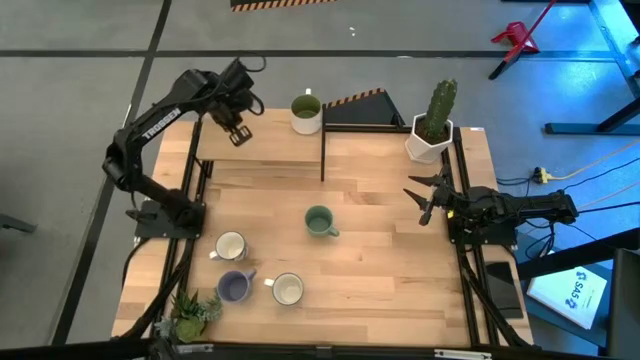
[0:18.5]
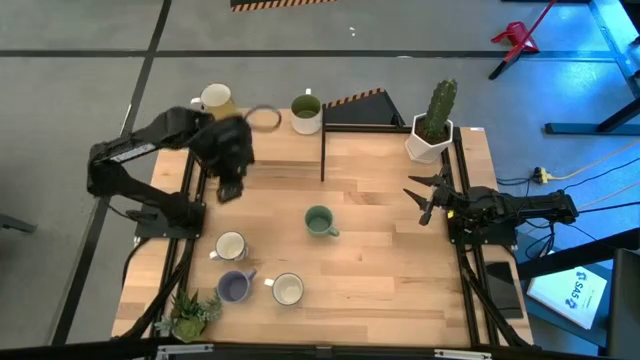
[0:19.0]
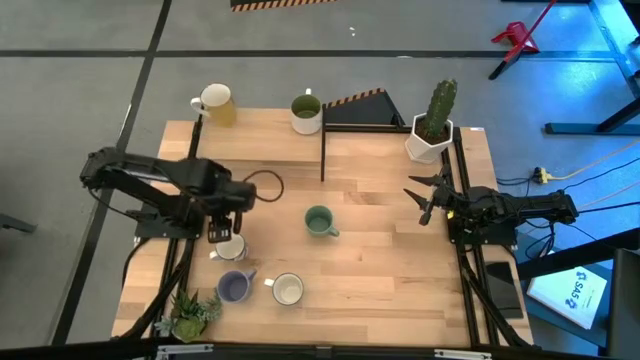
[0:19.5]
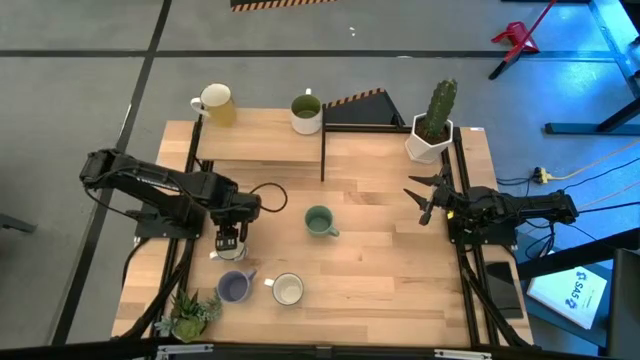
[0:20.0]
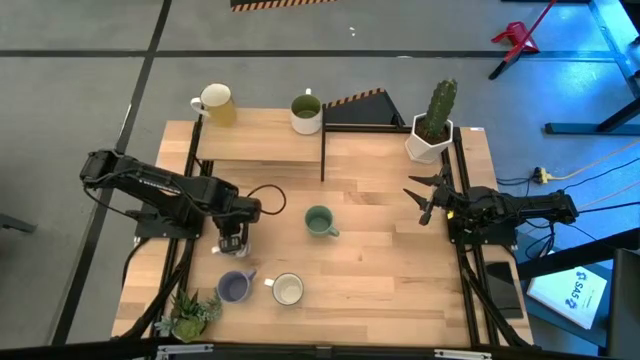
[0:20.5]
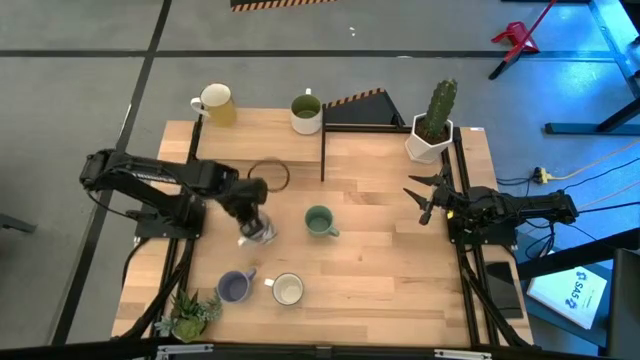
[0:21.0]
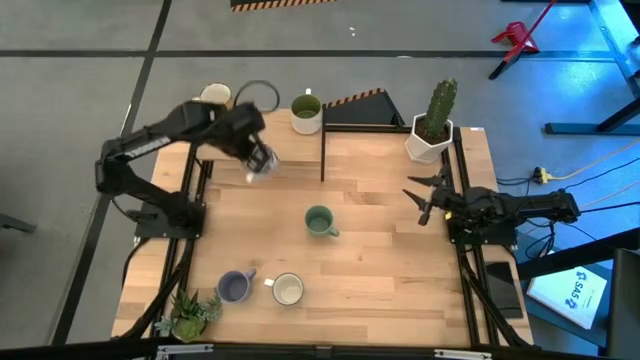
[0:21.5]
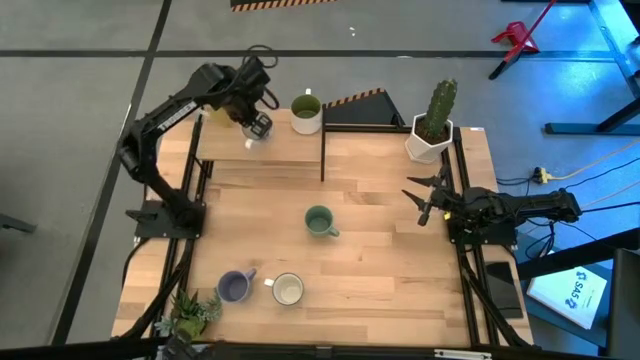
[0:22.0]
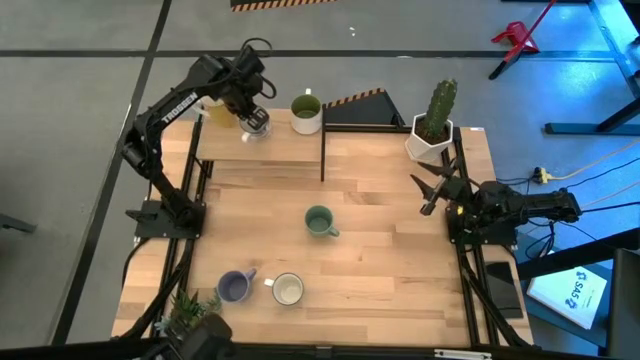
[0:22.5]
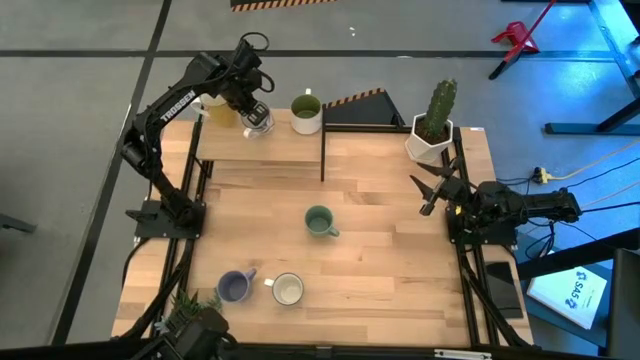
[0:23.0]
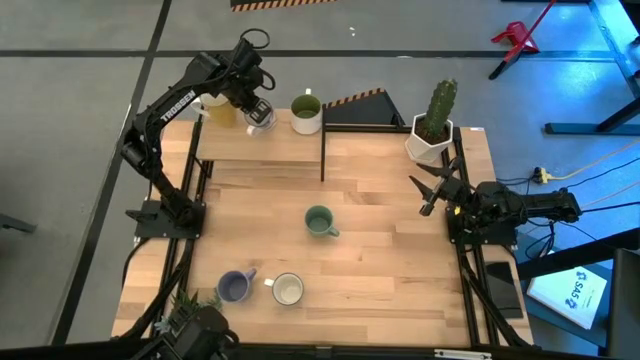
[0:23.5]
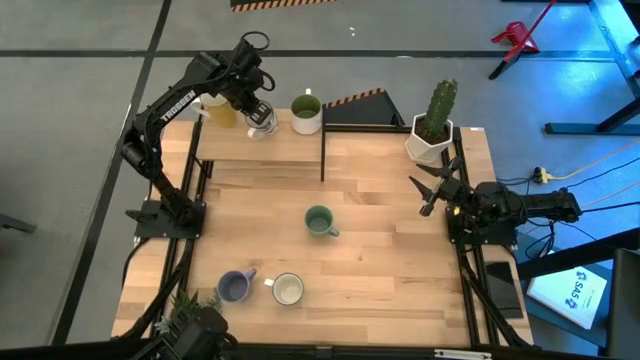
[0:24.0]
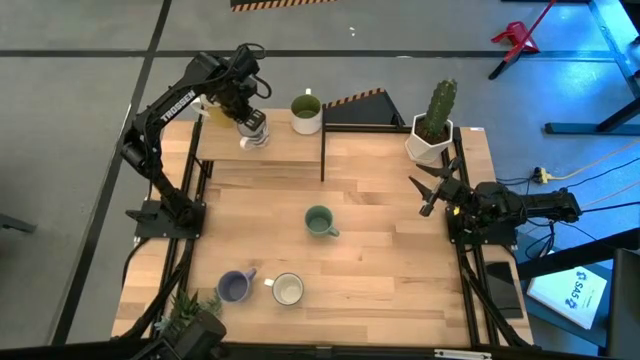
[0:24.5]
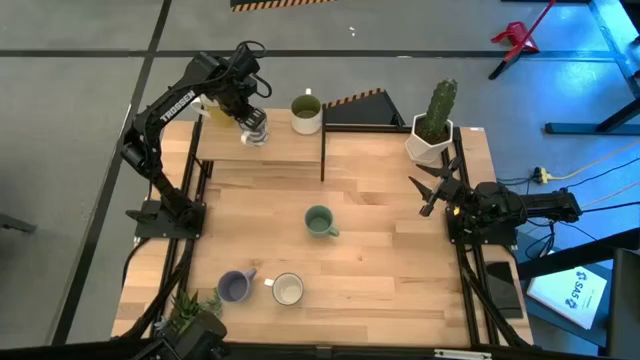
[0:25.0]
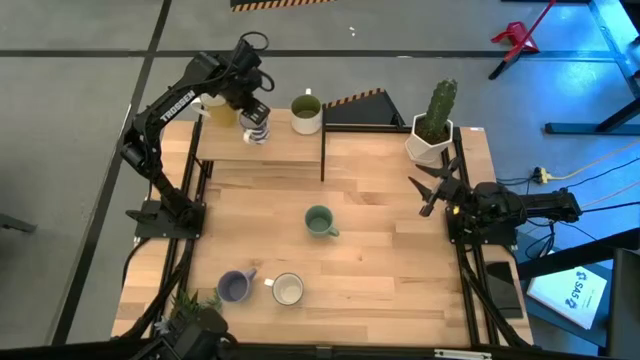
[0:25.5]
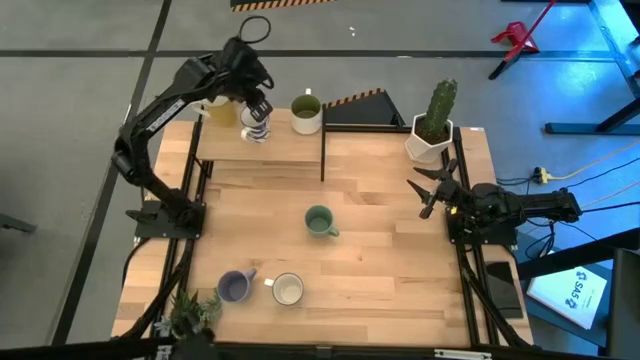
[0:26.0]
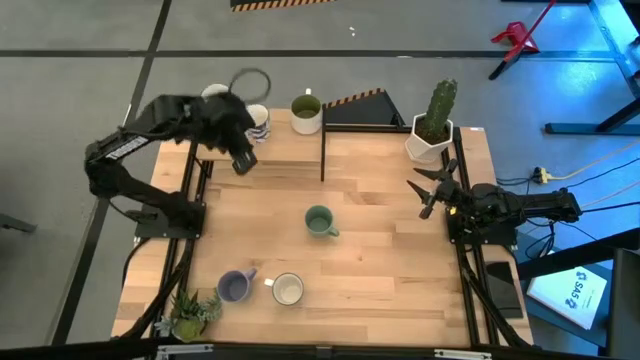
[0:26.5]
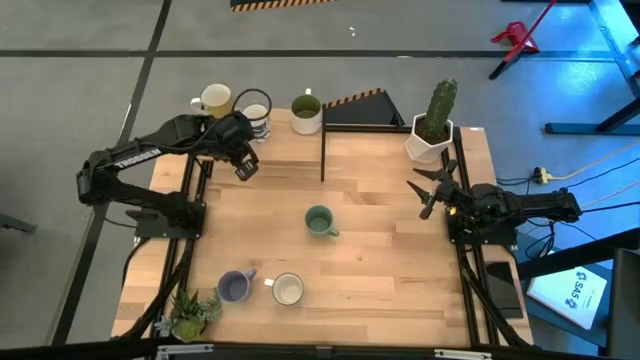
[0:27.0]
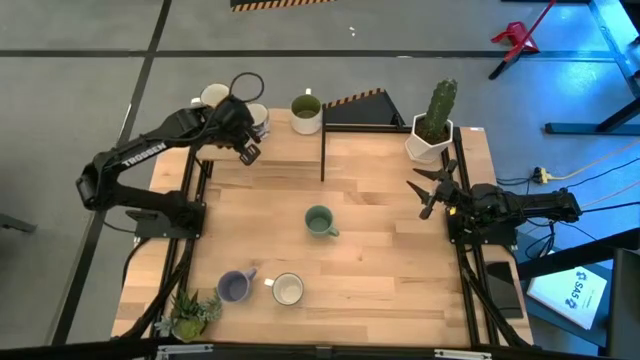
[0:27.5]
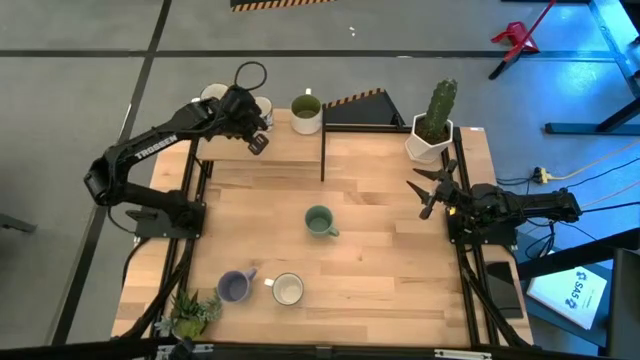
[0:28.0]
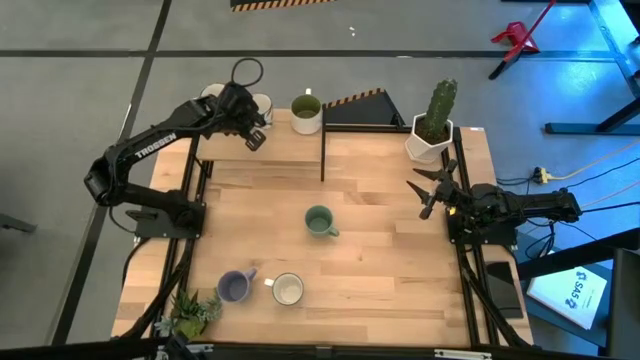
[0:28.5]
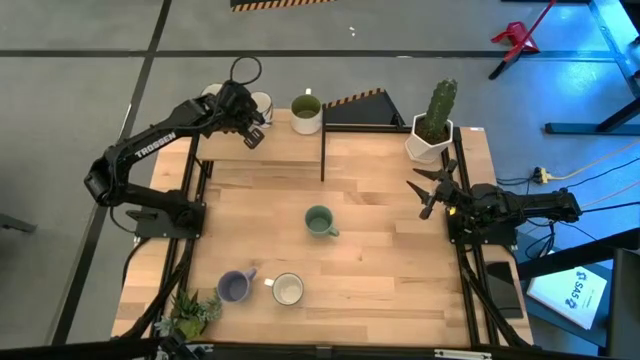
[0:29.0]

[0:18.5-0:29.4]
Task: Place coffee mugs
Put the patterned blue mug on the shelf

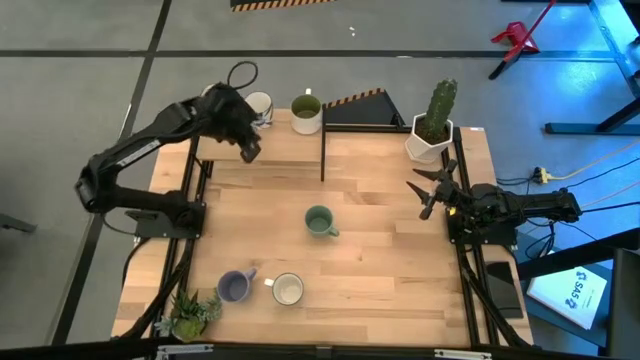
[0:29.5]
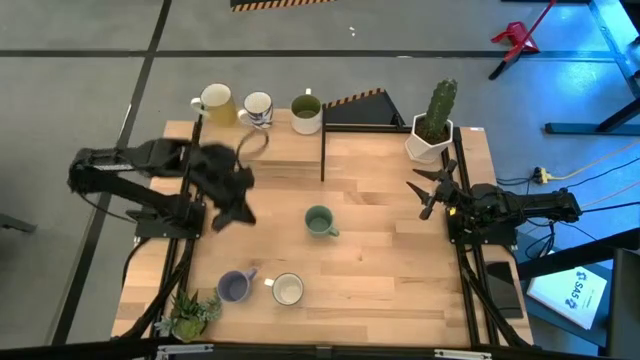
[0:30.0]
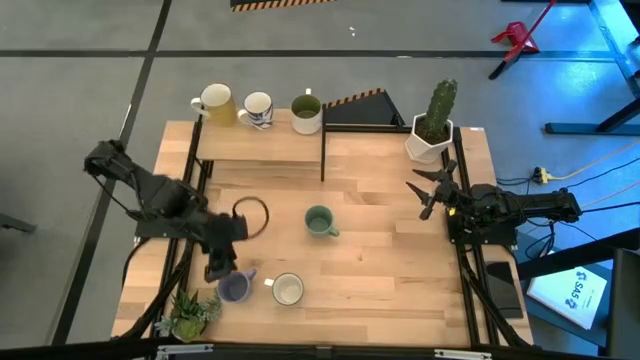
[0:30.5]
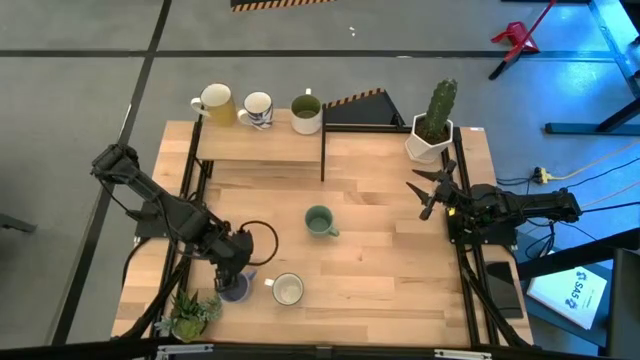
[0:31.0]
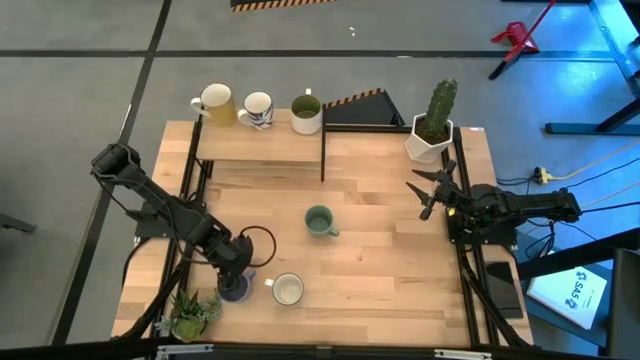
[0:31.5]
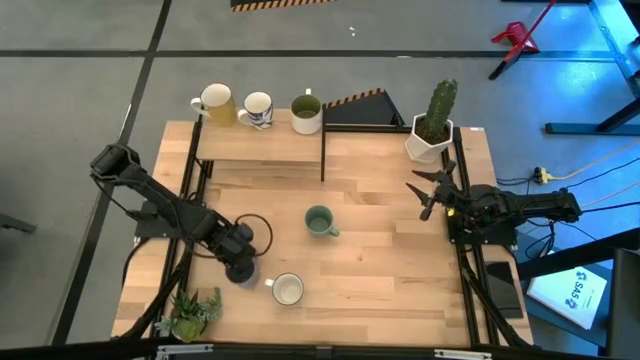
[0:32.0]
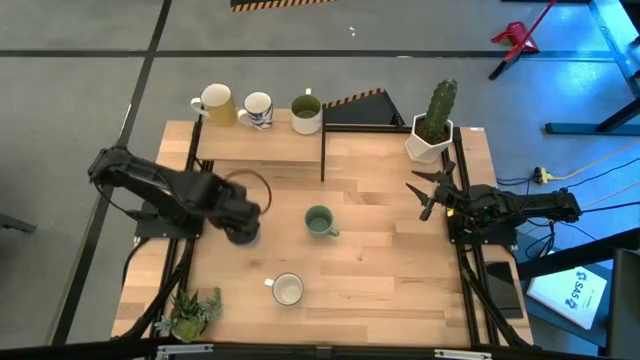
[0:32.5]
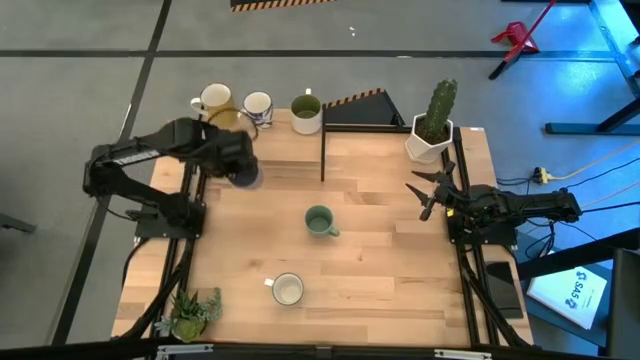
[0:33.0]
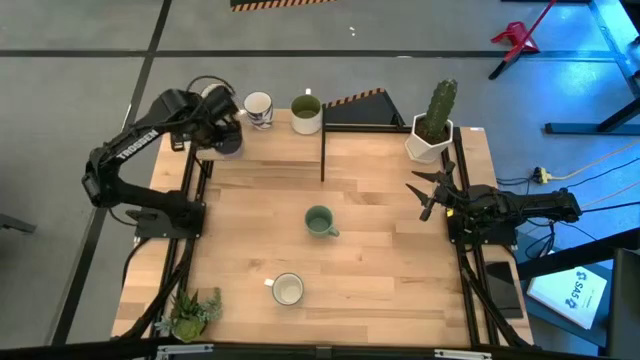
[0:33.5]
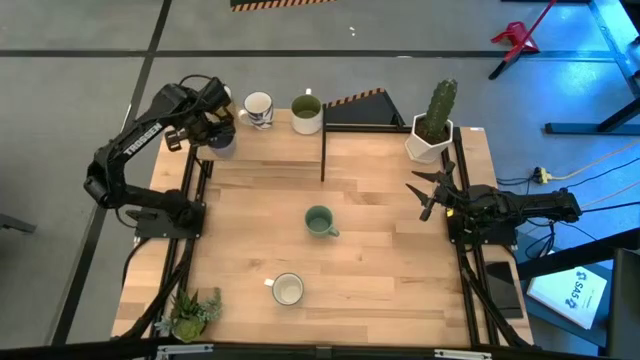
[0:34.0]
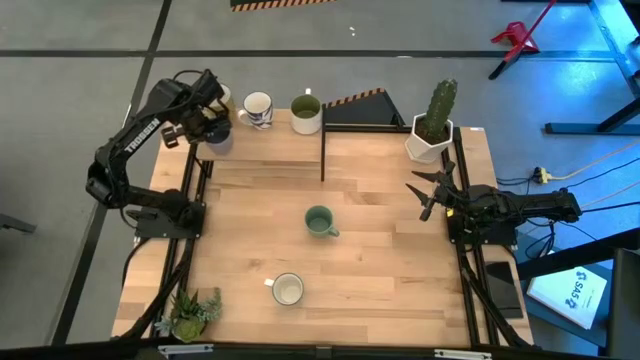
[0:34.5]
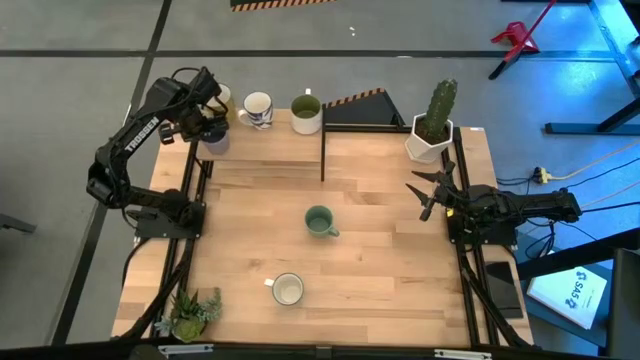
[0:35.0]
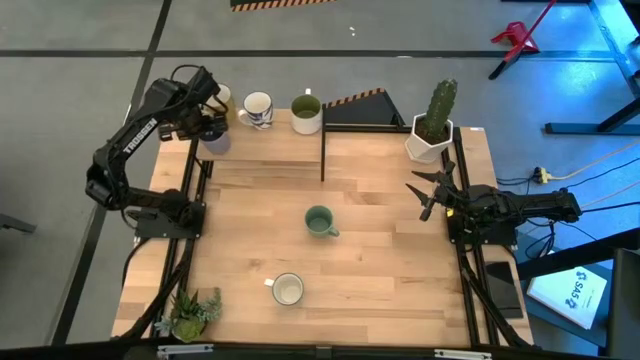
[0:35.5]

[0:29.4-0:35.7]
Put the blue mug on the shelf

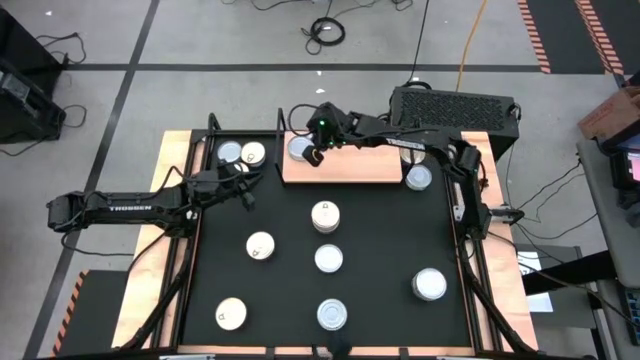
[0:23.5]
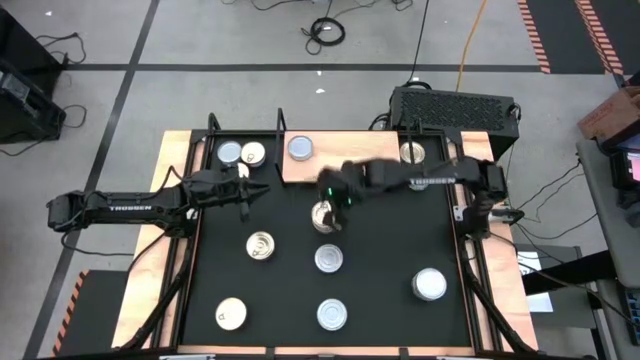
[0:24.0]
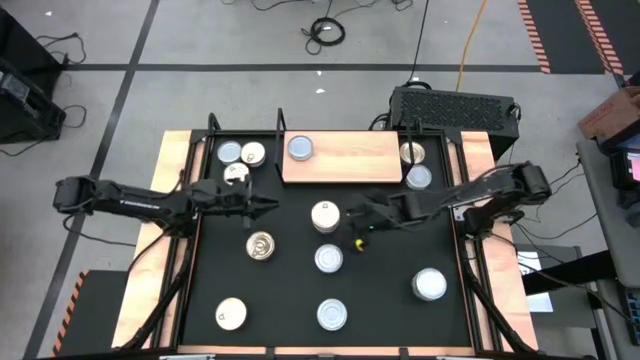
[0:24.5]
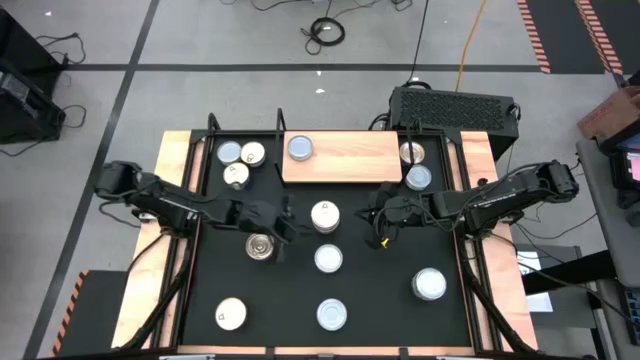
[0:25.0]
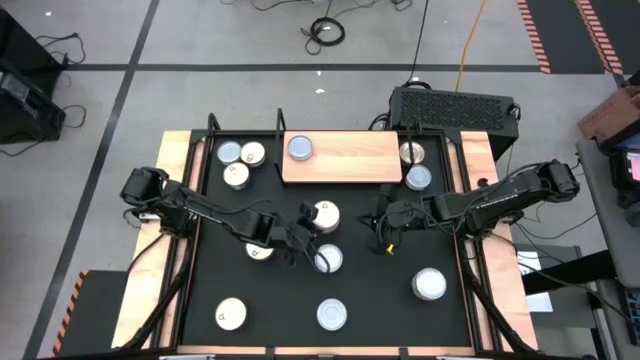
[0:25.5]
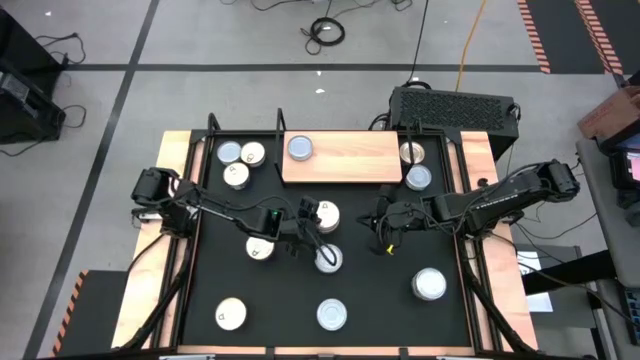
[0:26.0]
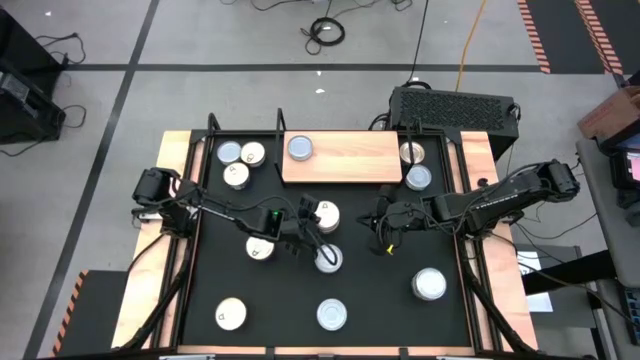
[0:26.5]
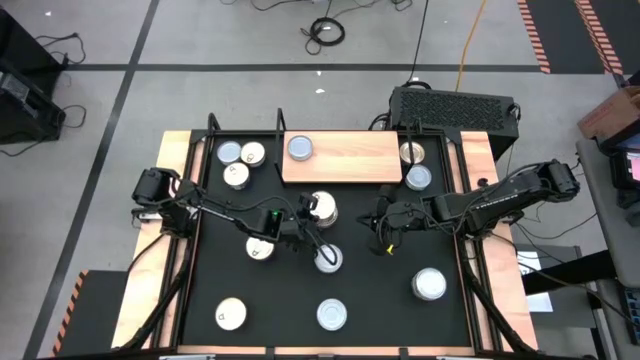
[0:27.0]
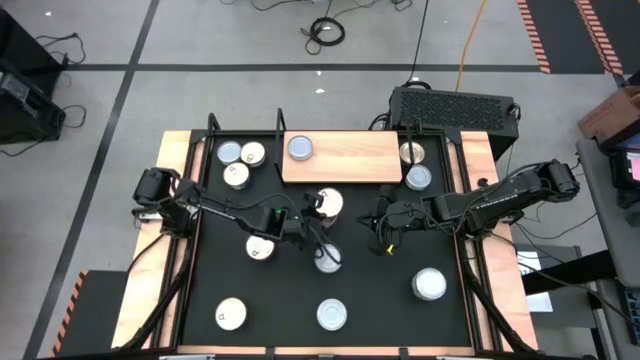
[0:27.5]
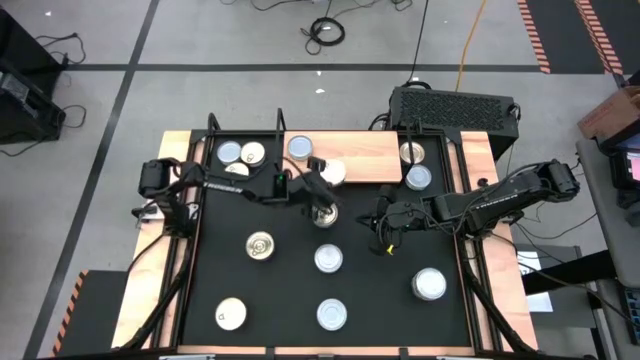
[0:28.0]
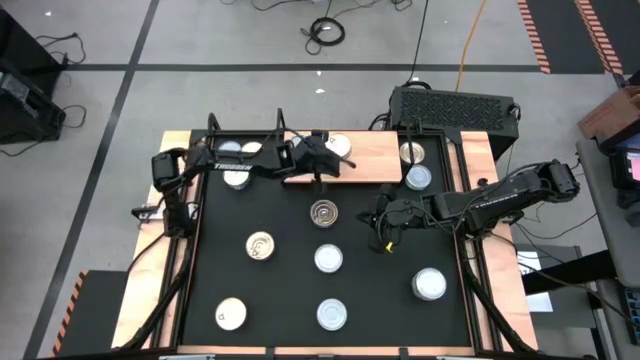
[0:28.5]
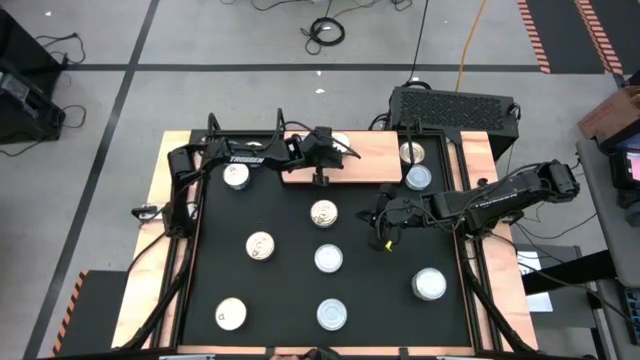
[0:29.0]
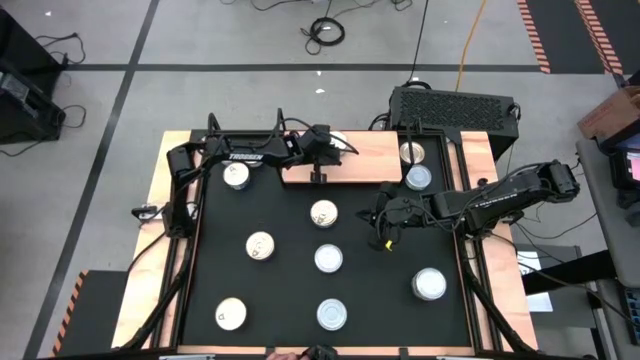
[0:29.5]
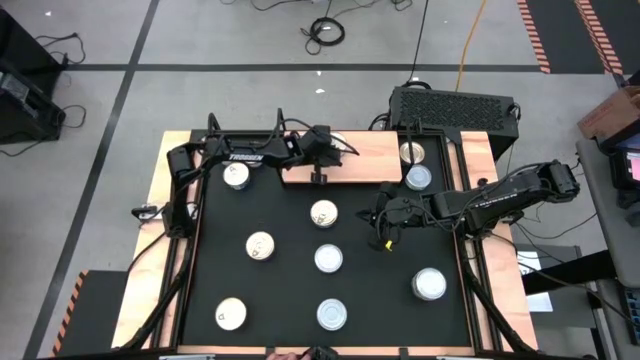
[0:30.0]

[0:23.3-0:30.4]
Task: Stack canned seafood by type on shelf
Put the center blue tuna can on the shelf
